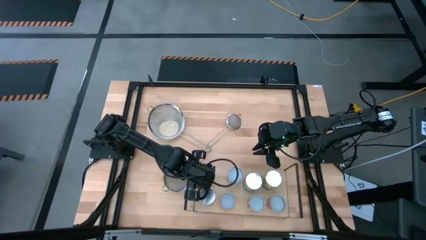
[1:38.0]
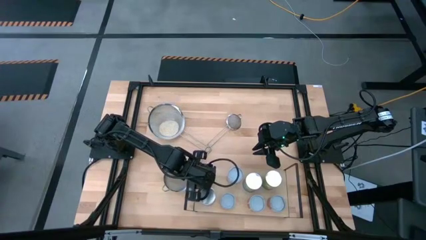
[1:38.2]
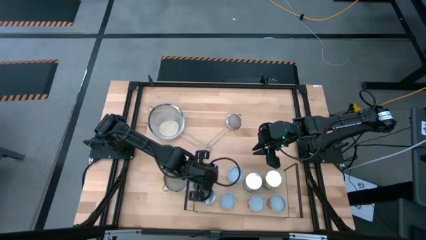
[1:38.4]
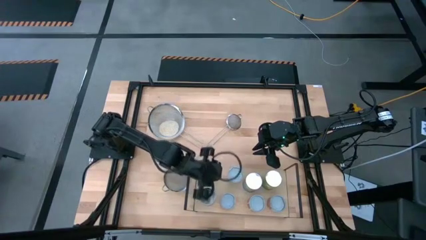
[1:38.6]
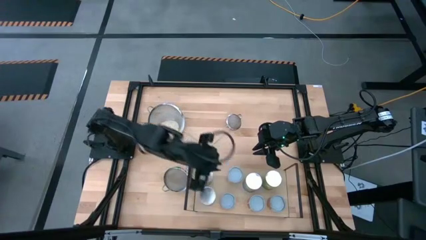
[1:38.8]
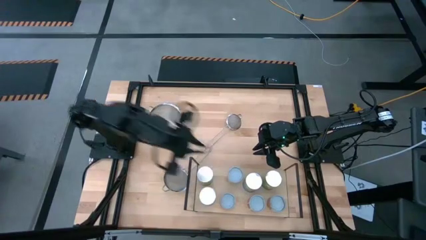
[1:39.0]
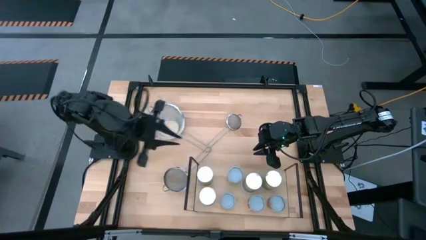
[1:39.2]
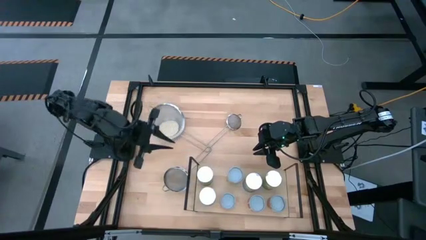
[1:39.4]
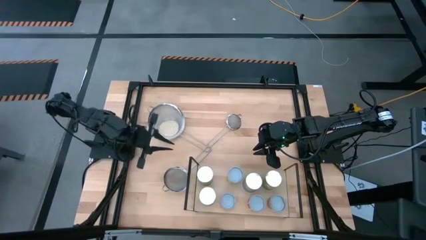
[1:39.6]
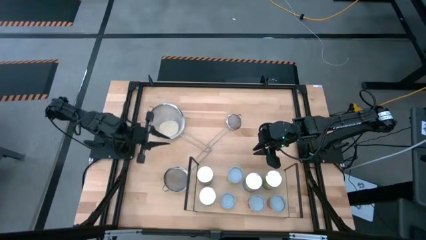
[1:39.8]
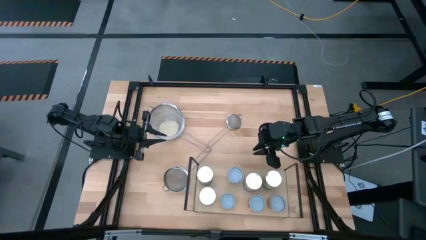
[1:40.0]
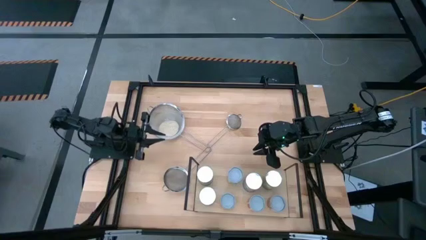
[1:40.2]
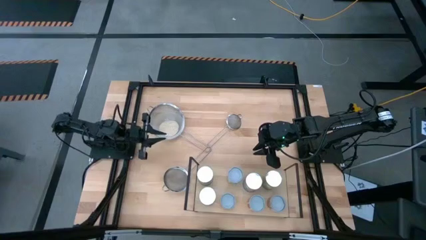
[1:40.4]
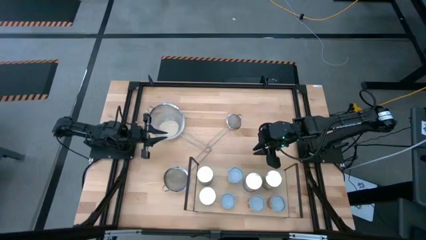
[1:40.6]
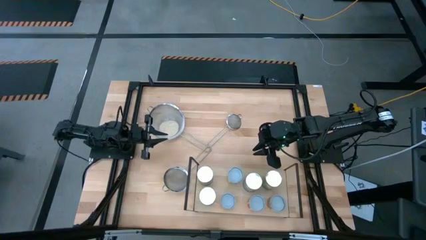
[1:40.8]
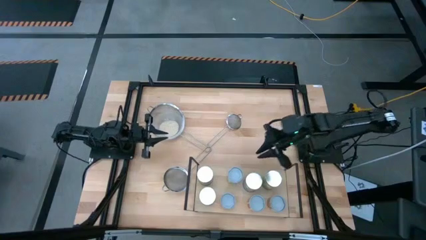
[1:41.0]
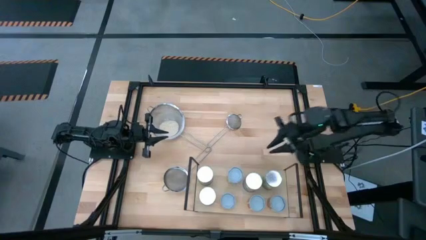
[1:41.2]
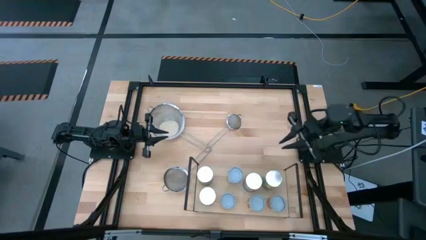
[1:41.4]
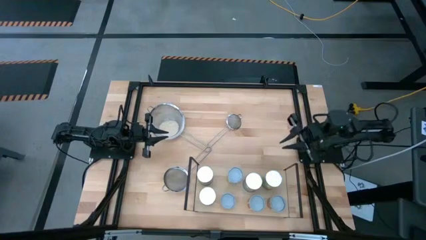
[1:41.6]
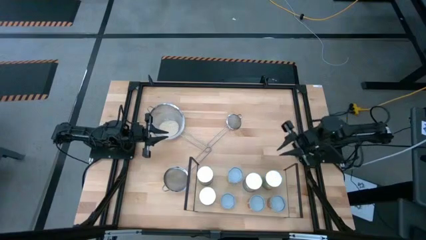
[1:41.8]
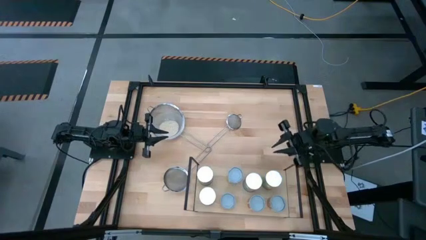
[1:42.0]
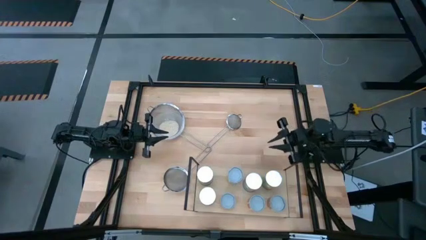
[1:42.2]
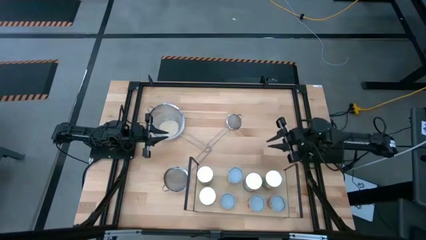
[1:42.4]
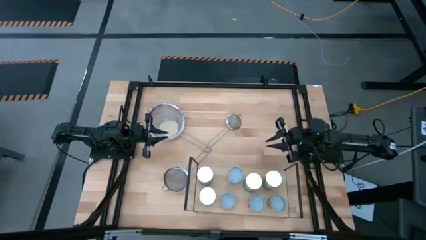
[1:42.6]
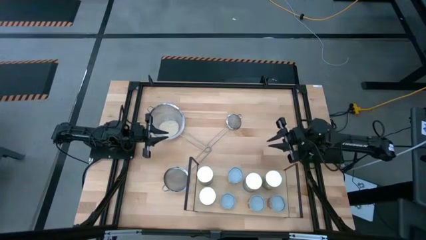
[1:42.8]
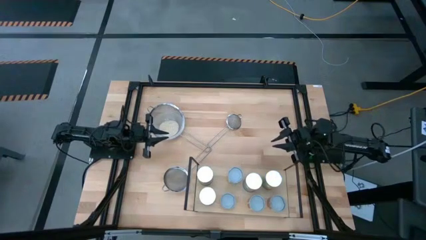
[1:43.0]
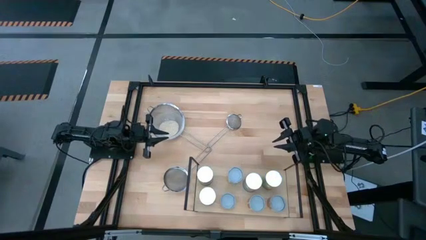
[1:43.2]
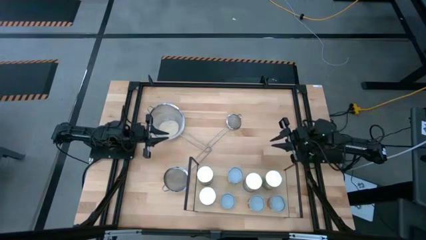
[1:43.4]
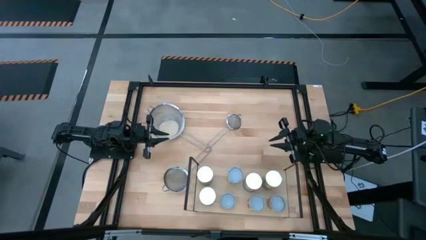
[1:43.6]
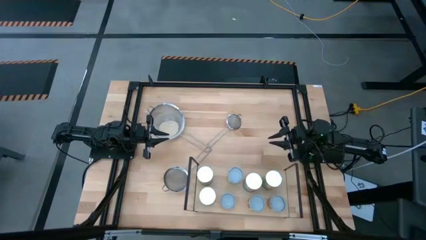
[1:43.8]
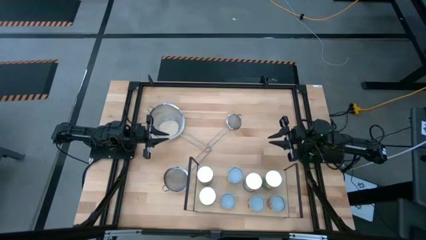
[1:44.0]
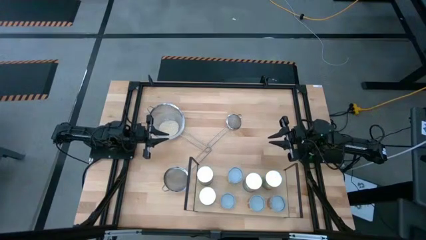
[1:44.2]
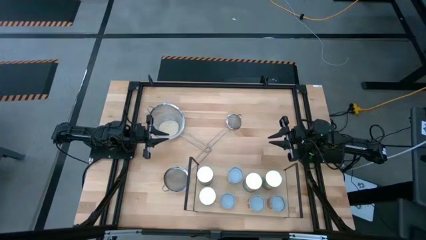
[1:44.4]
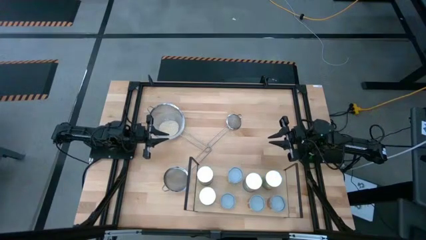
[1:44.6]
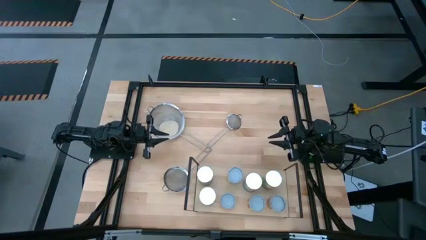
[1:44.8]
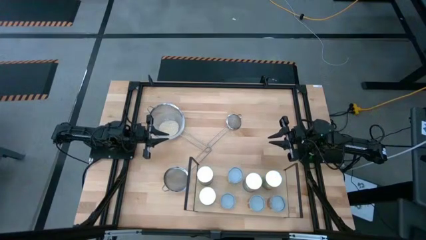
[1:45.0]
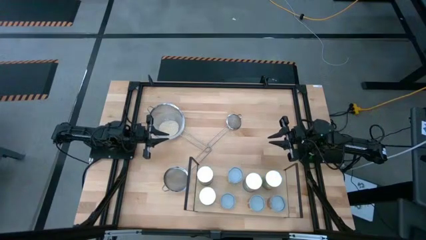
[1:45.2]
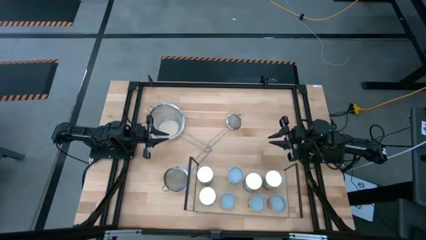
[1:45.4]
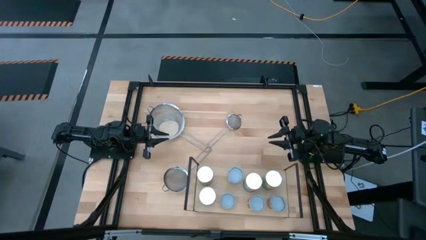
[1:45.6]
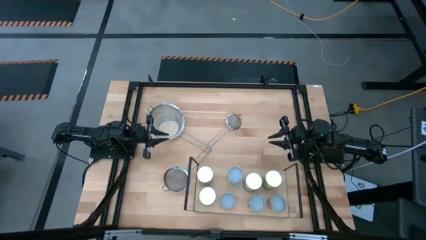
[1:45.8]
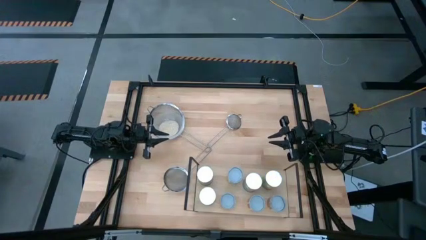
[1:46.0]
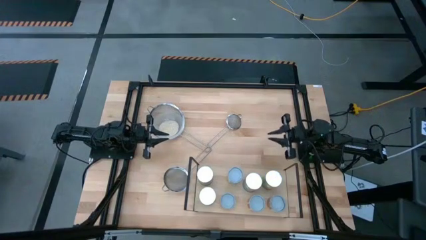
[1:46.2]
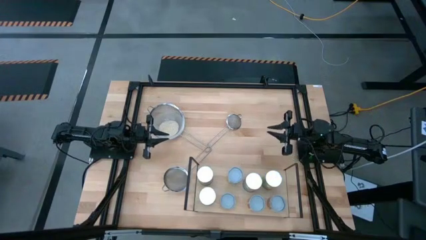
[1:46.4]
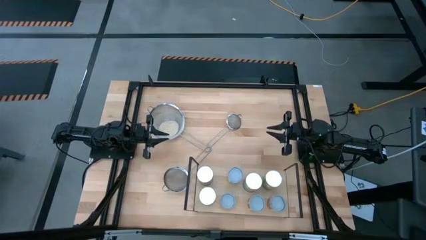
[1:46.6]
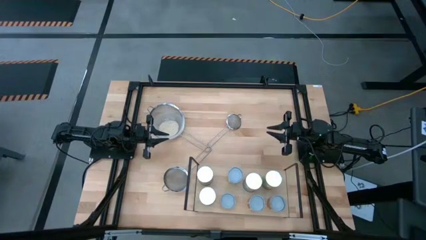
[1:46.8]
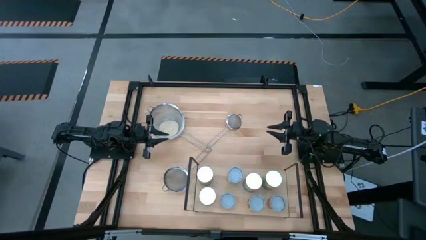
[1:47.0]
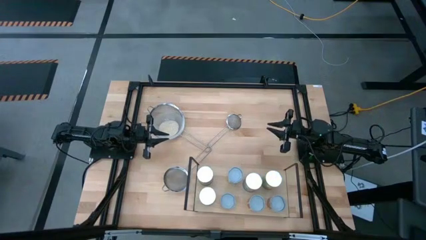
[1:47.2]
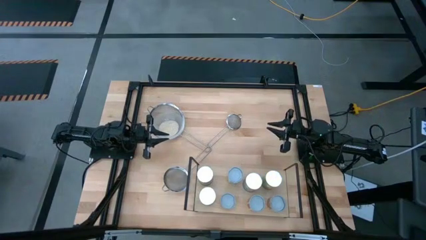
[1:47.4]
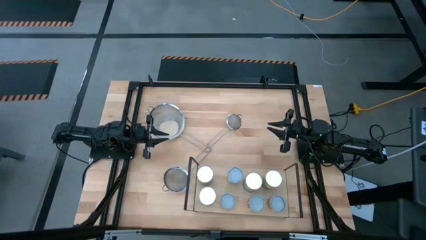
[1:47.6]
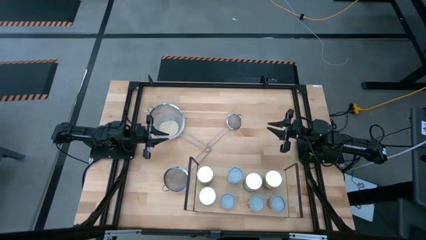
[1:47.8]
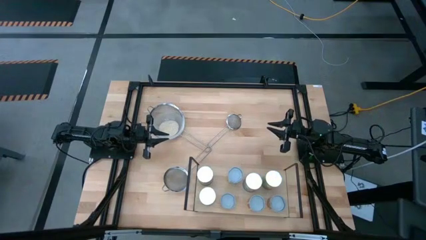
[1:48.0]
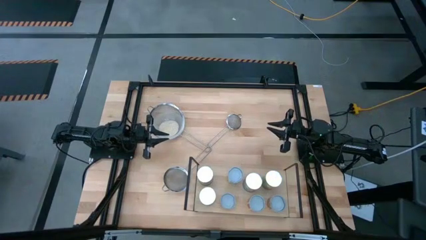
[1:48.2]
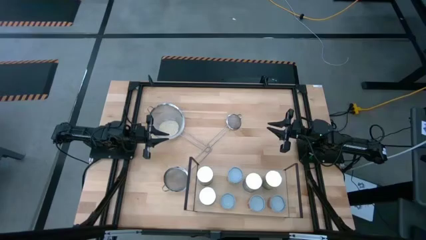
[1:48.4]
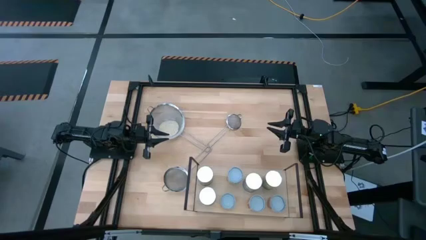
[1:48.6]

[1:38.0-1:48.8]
Task: Pick and place cans onto a shelf
Return to Home Position
